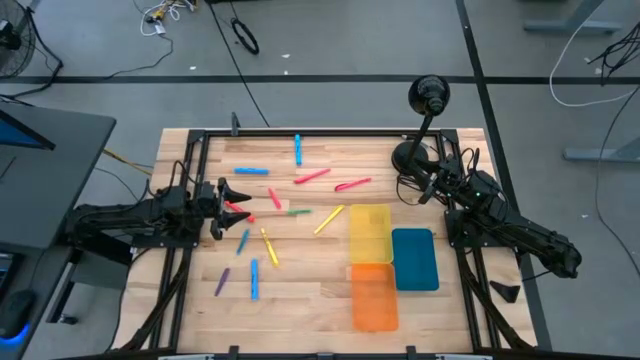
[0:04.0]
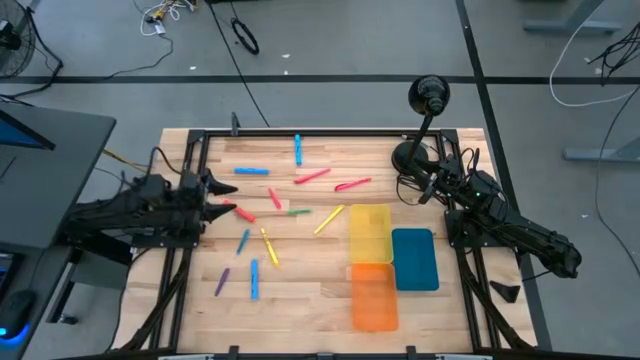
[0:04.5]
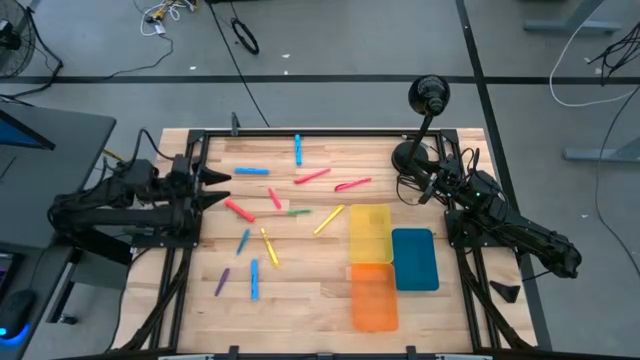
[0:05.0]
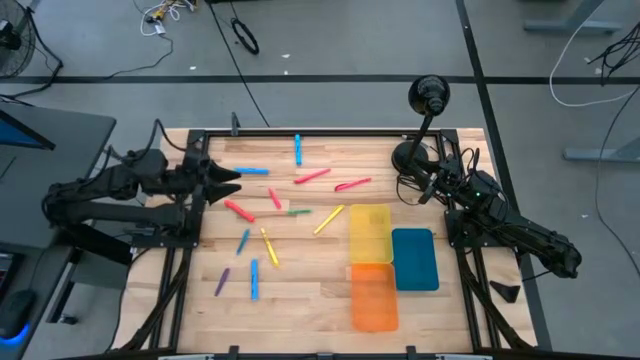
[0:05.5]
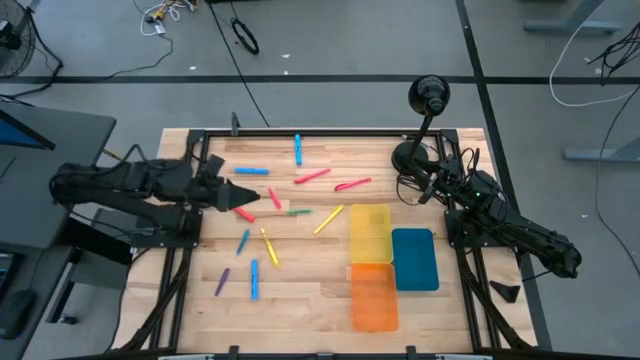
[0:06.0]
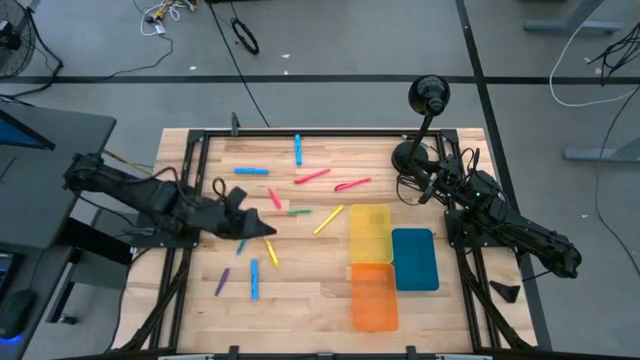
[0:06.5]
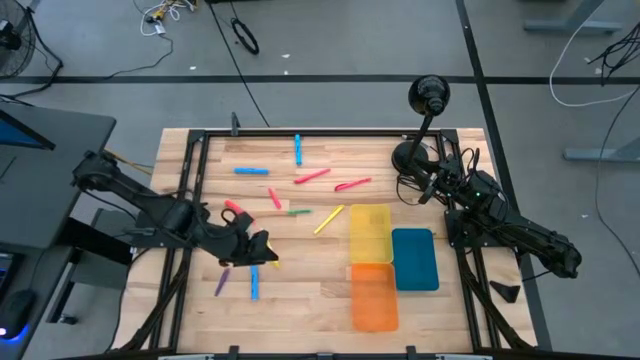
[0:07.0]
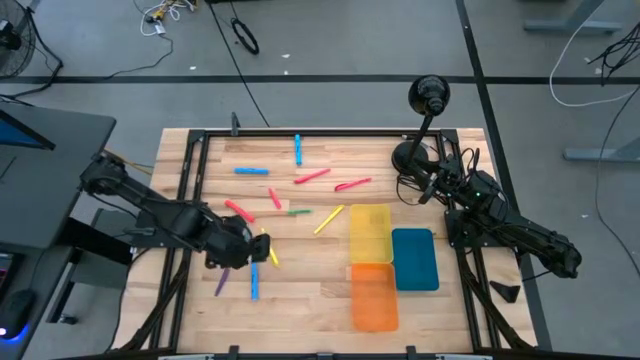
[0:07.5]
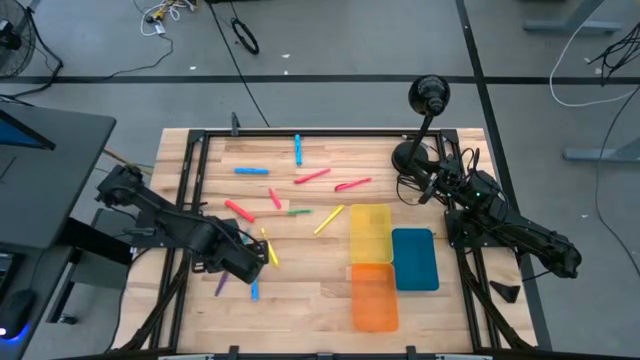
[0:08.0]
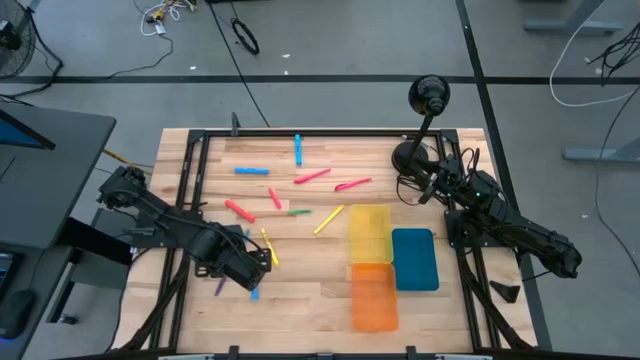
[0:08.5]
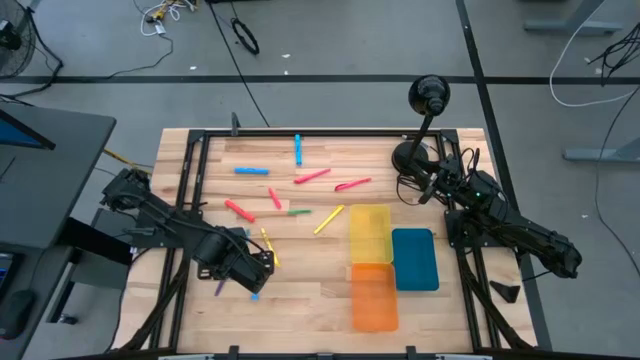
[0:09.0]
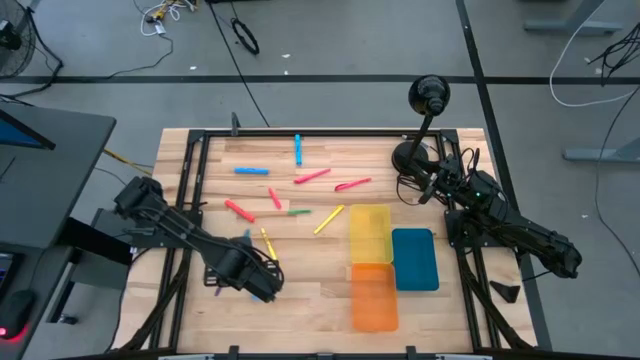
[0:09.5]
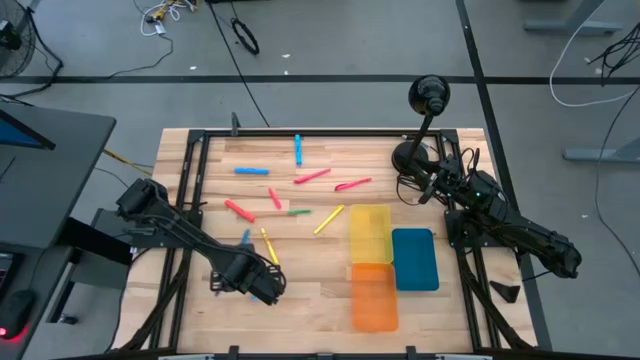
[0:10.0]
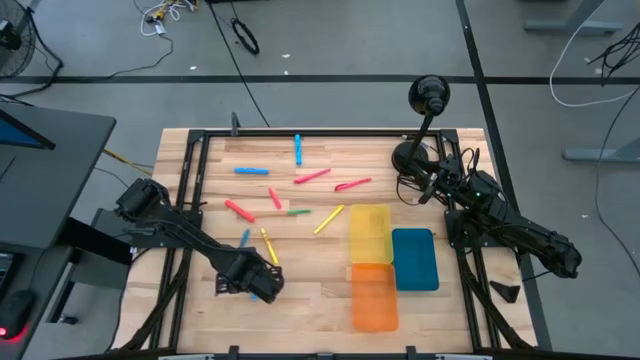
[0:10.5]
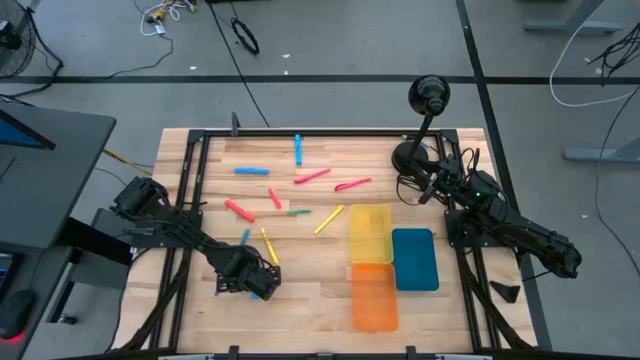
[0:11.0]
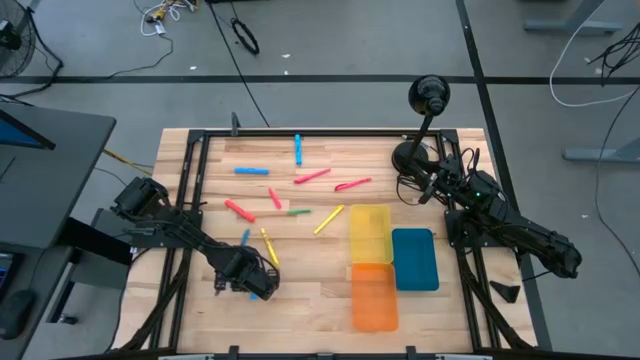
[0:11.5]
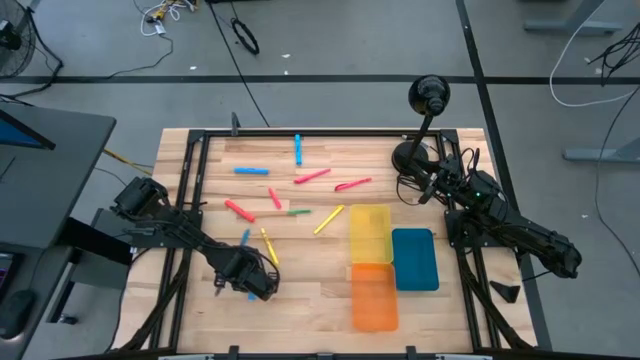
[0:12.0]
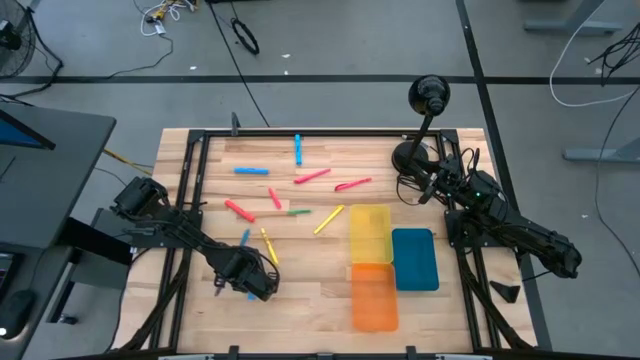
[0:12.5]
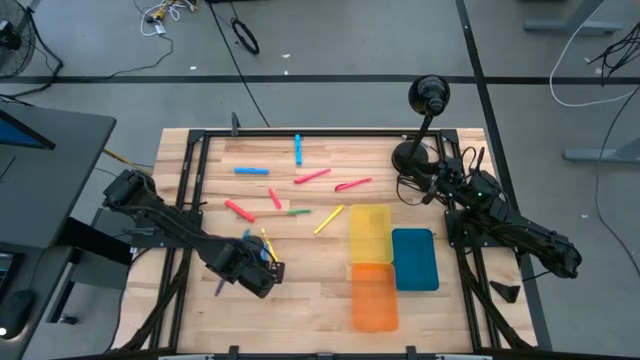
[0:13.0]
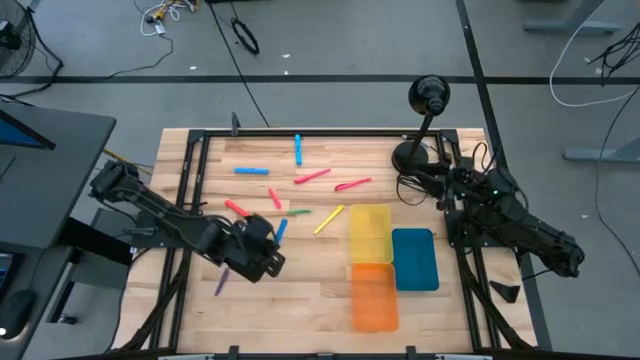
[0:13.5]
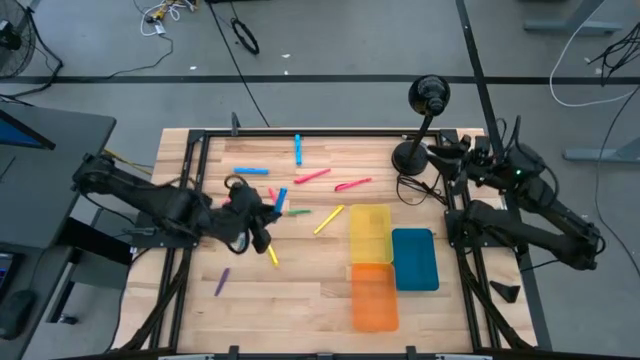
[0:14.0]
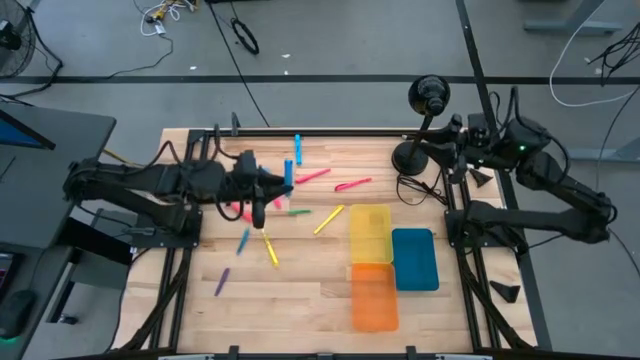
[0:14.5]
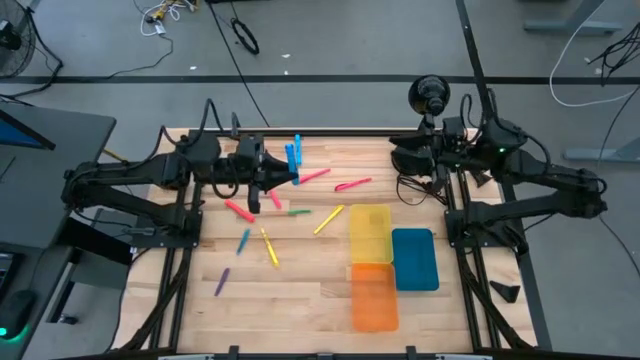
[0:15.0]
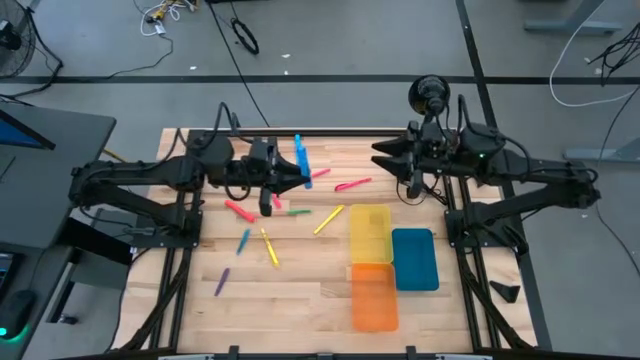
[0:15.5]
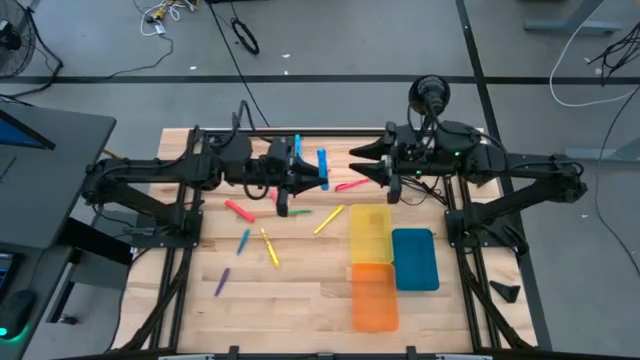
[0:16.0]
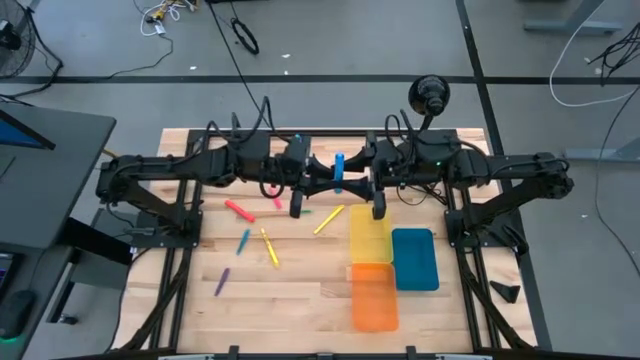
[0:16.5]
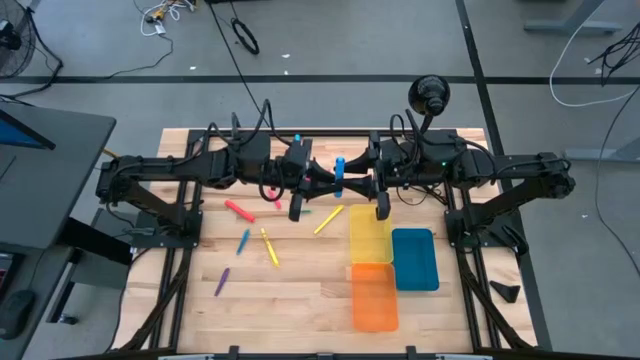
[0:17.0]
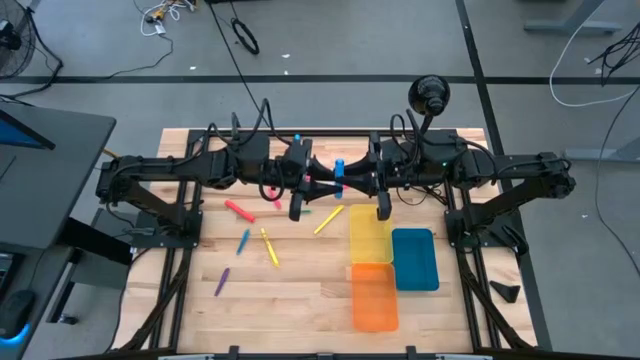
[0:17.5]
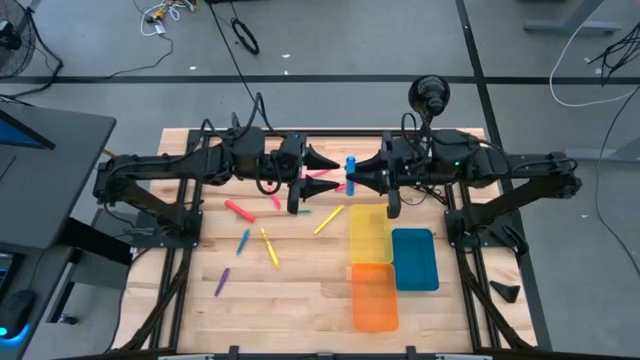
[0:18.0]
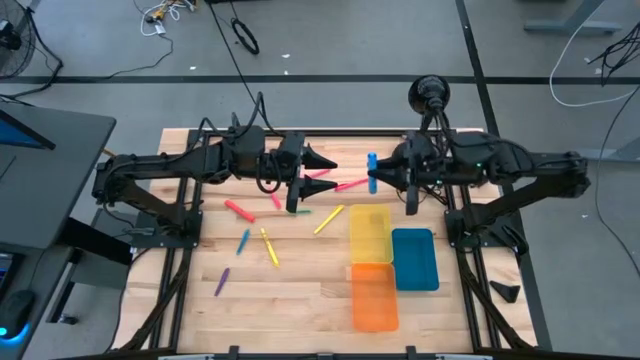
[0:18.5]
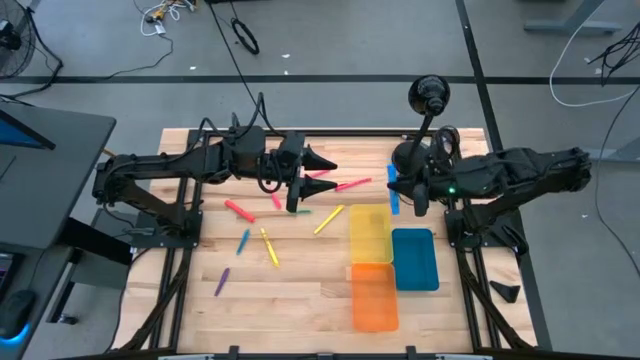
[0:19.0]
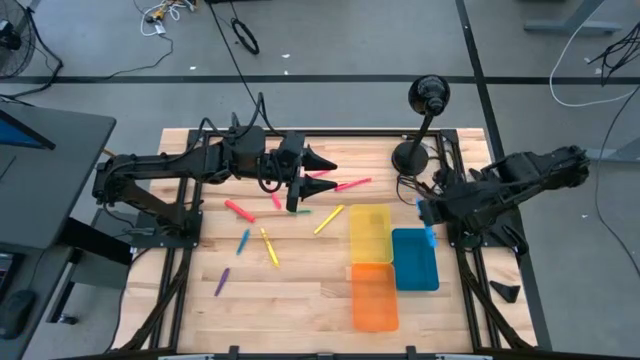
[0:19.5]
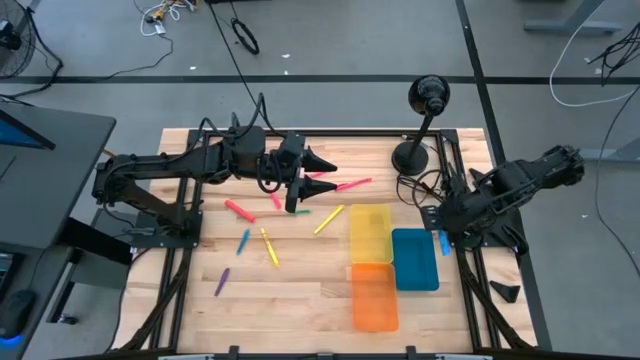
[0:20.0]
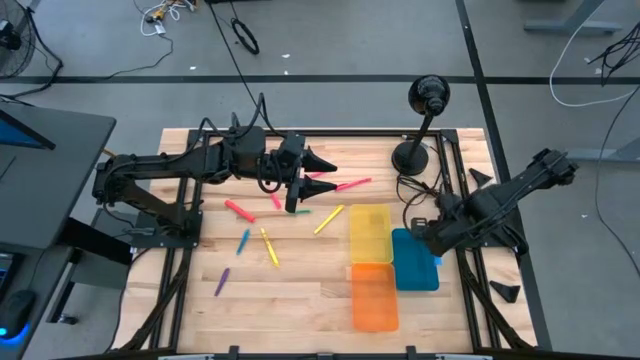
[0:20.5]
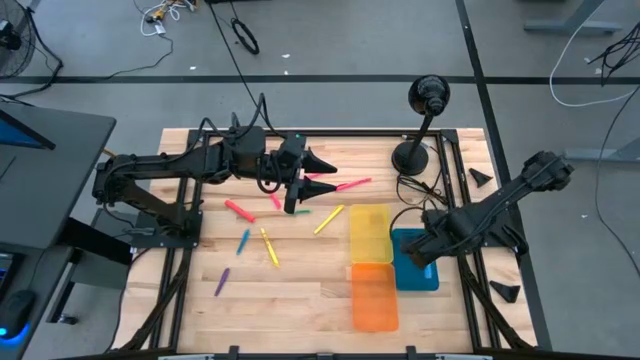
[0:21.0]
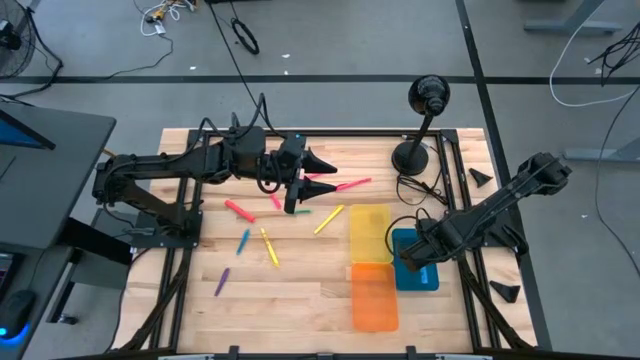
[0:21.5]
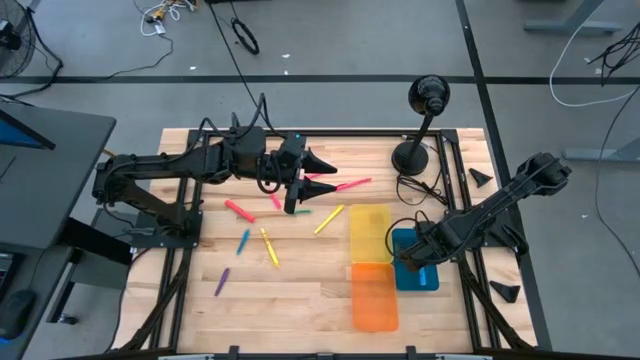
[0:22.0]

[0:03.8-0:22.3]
Task: Pick & Place Markers
Put the bottom blue highlighter into the blue bin

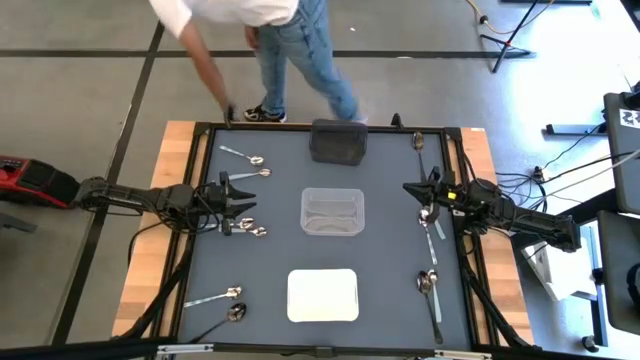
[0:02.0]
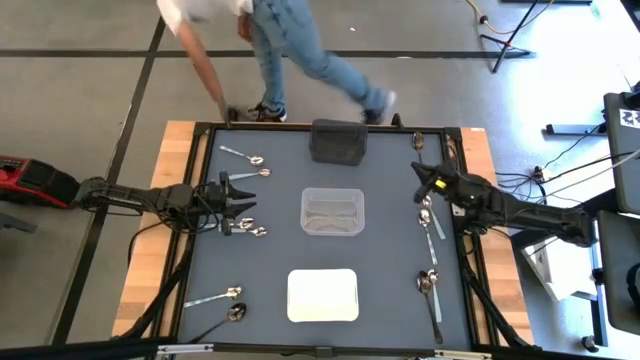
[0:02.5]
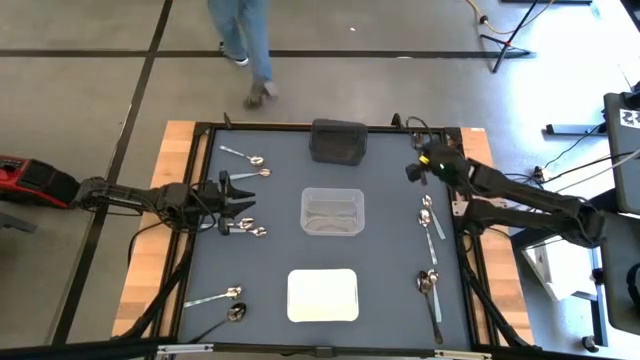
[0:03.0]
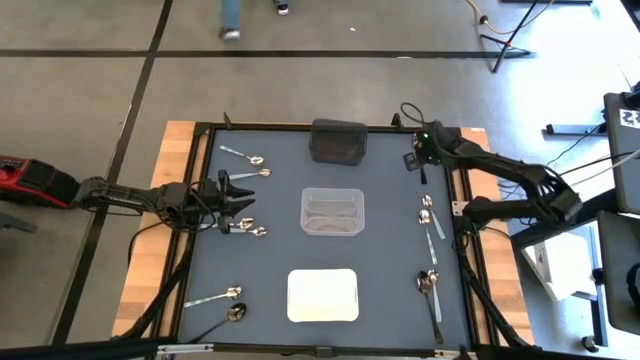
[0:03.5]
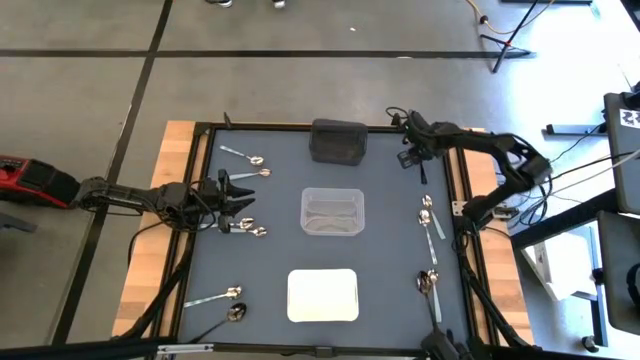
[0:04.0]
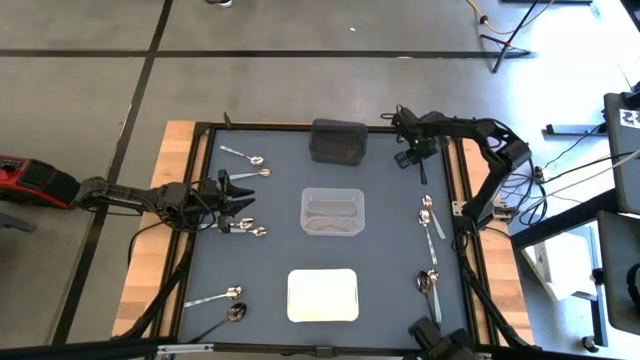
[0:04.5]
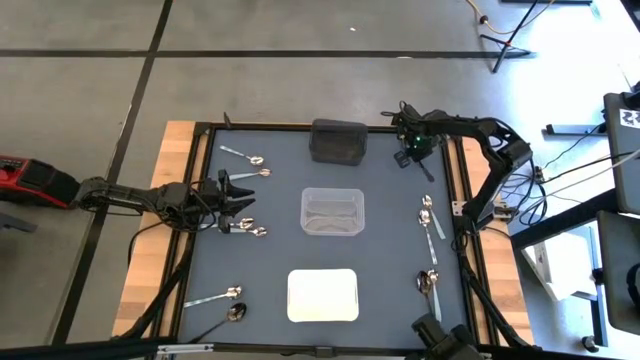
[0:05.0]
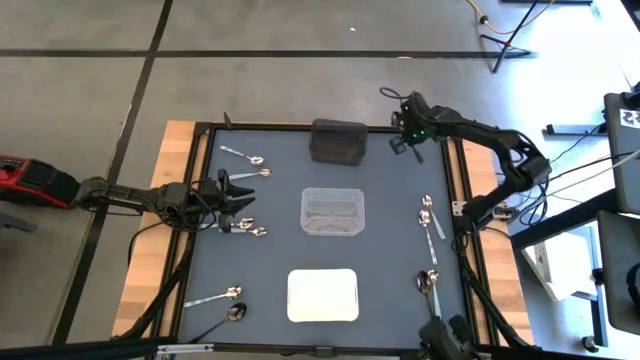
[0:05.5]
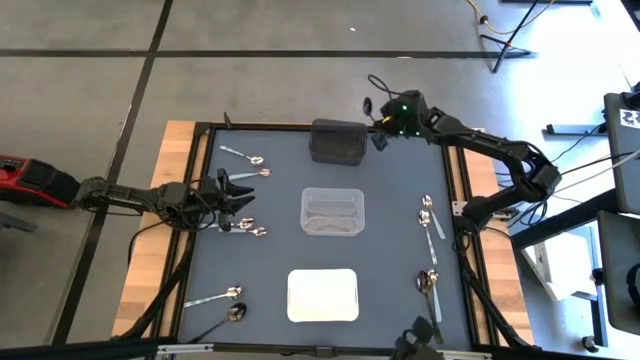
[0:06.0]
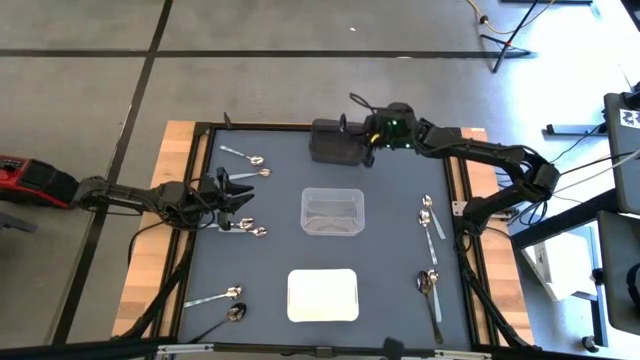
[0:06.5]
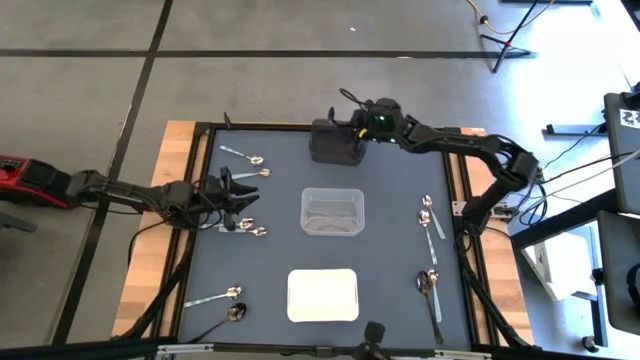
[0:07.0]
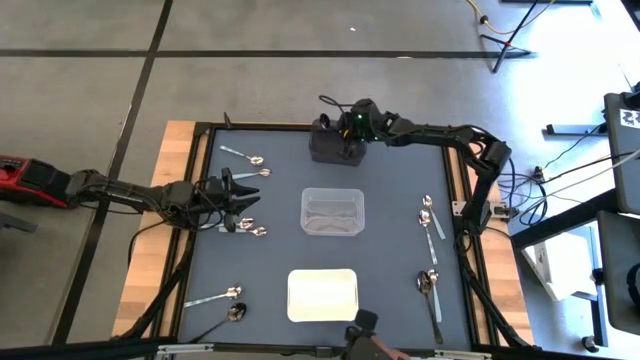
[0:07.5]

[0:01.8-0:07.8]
Task: Sort silverware by color (type)
Put the top black spoon into the black bin
